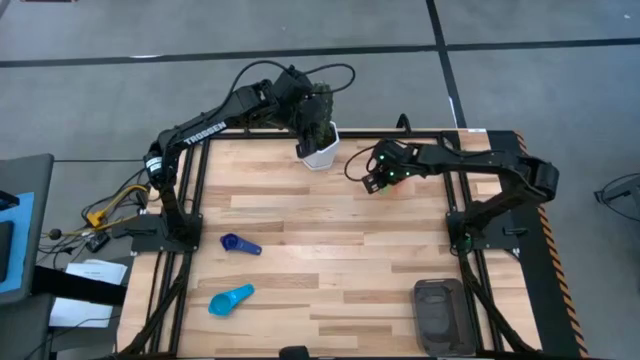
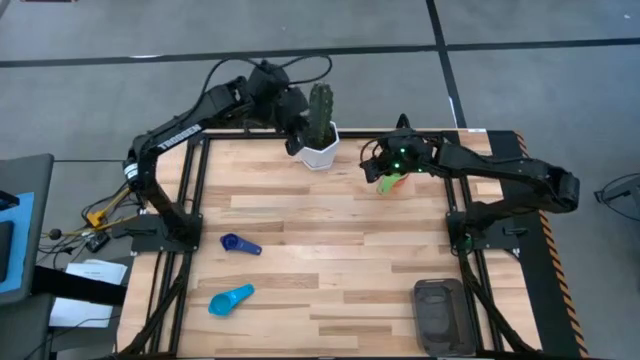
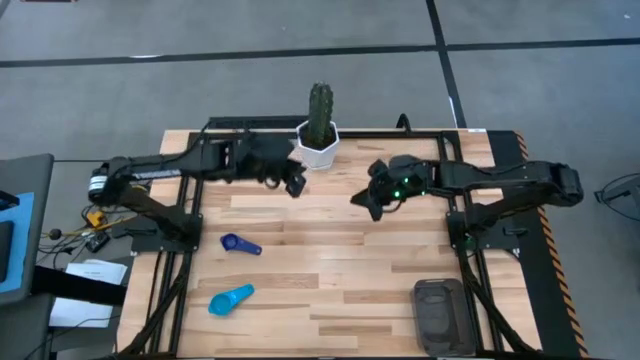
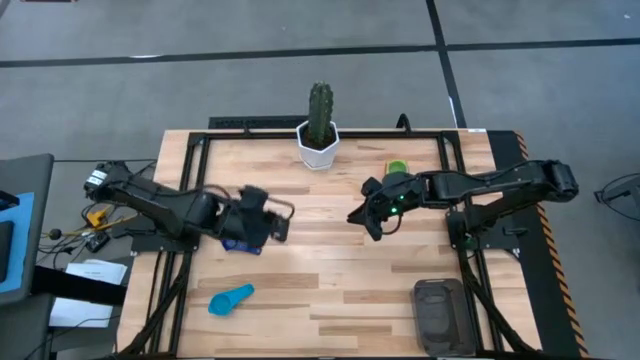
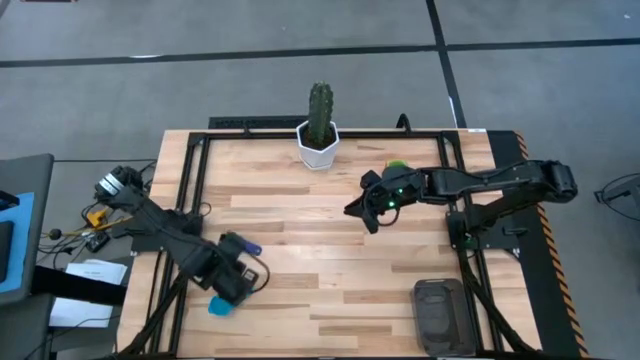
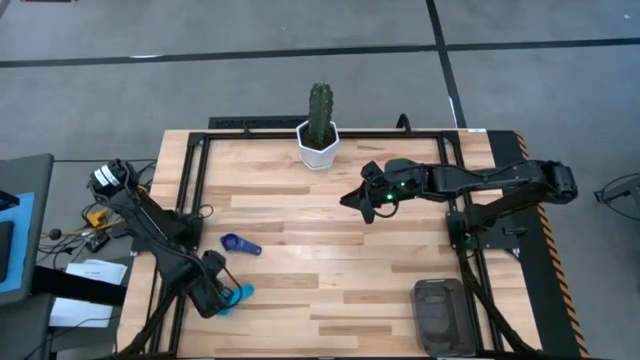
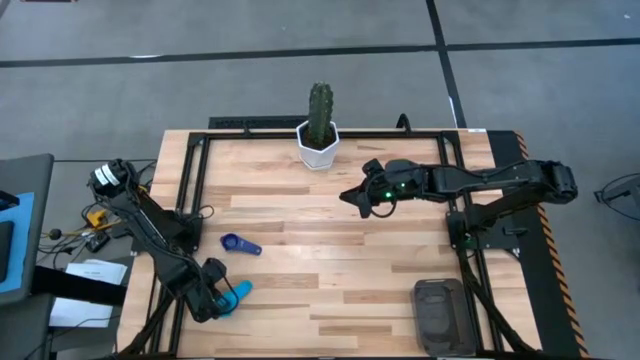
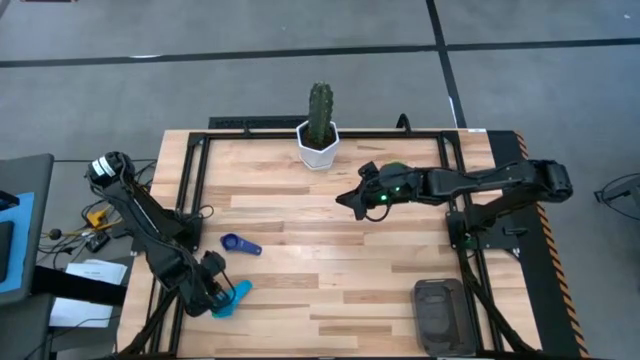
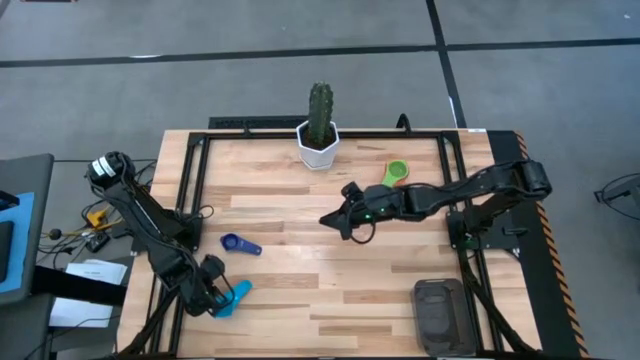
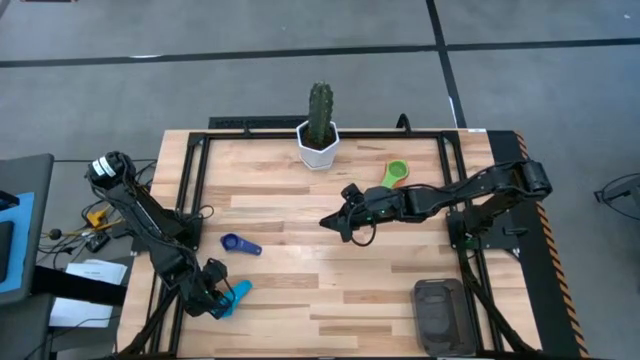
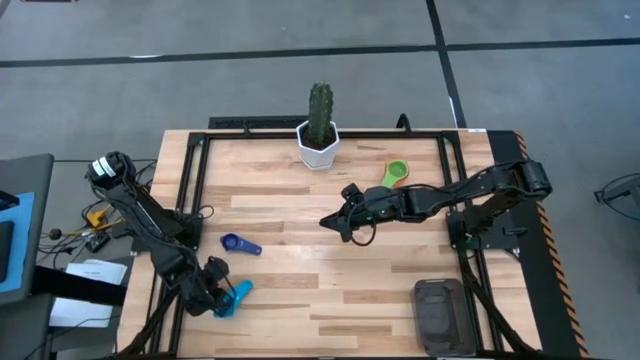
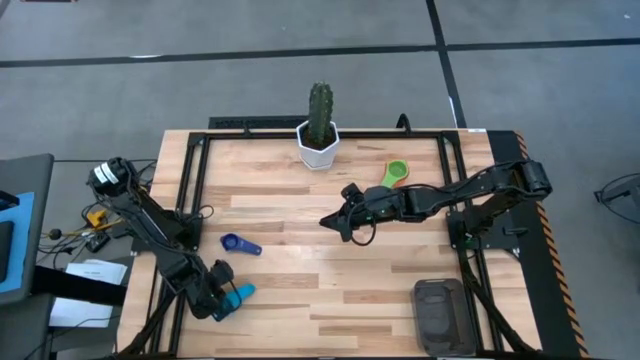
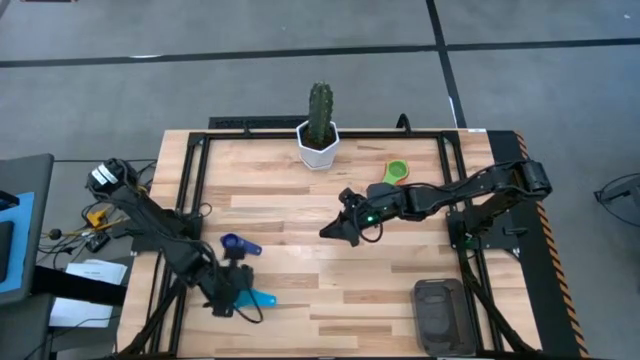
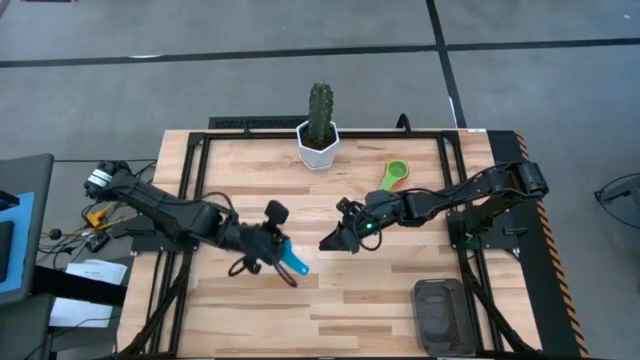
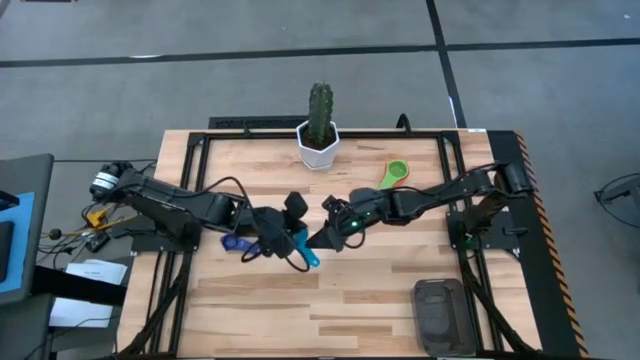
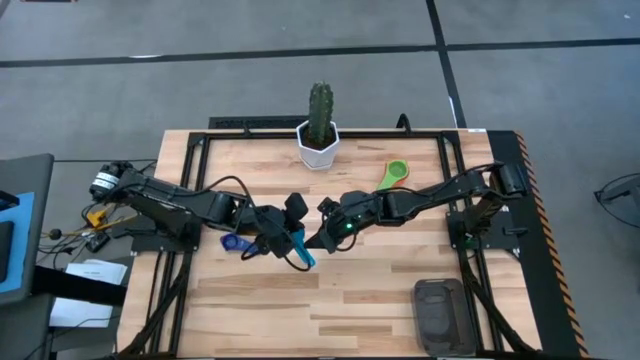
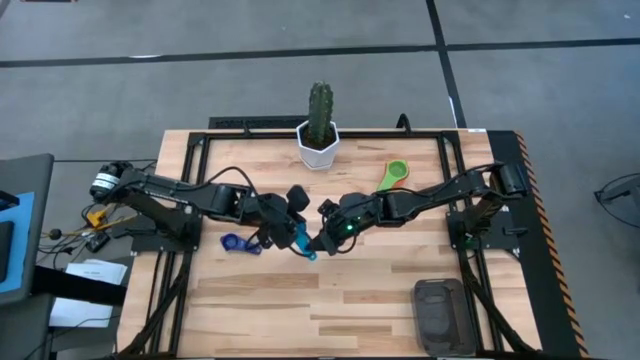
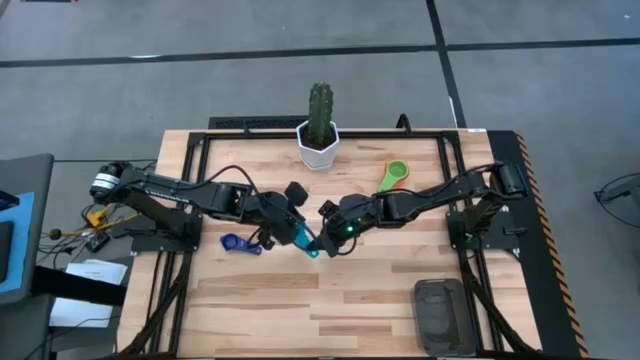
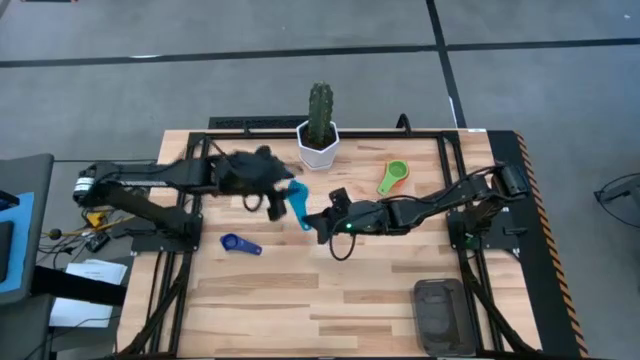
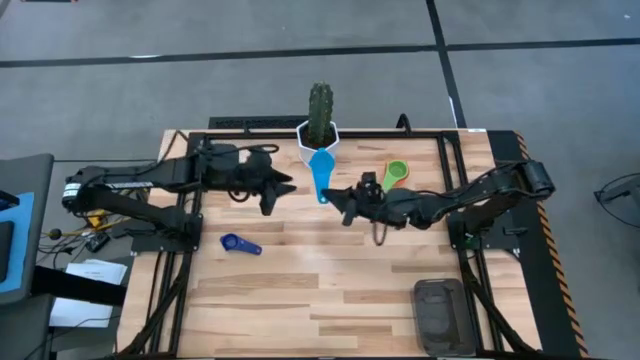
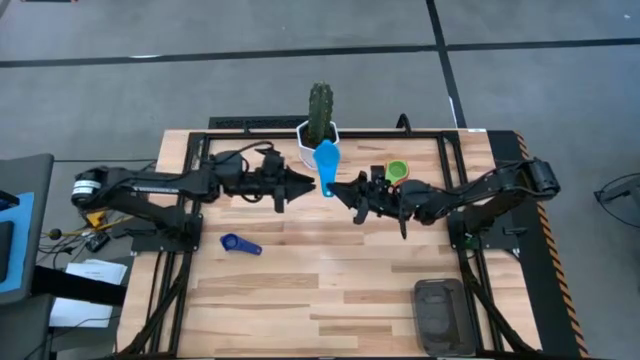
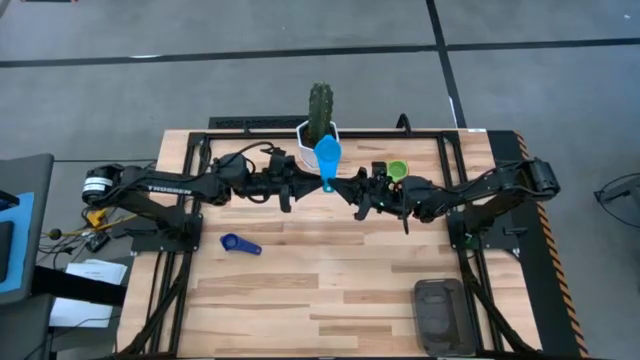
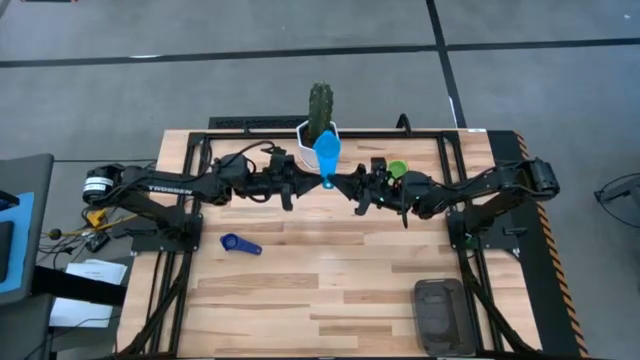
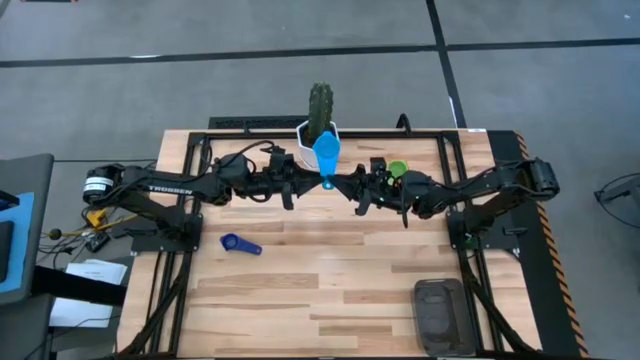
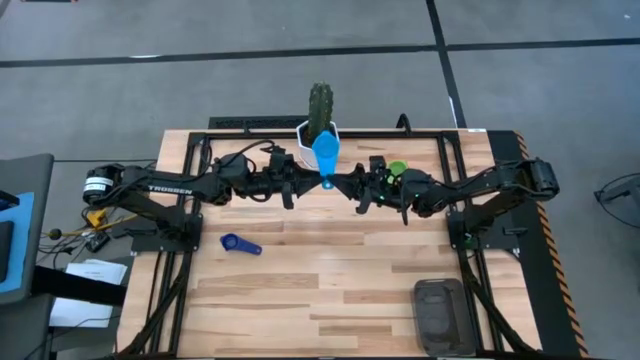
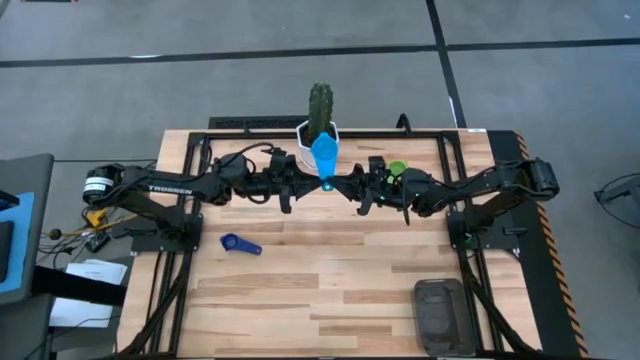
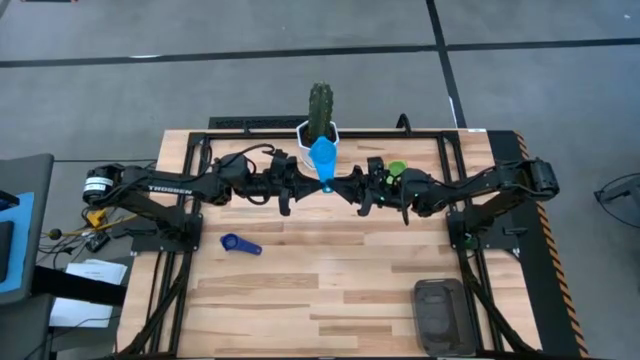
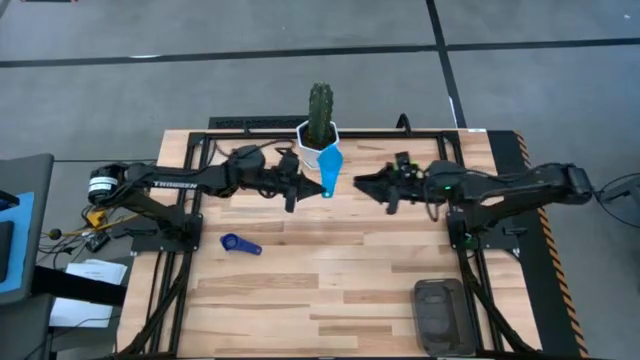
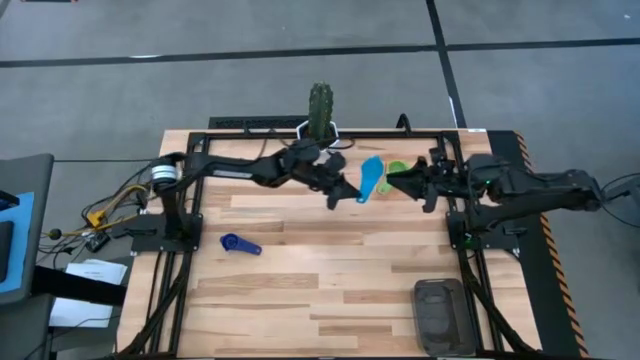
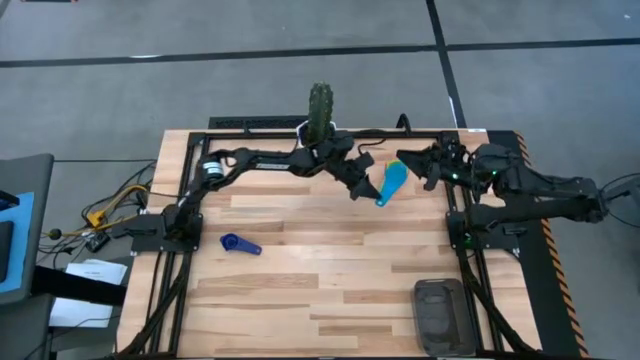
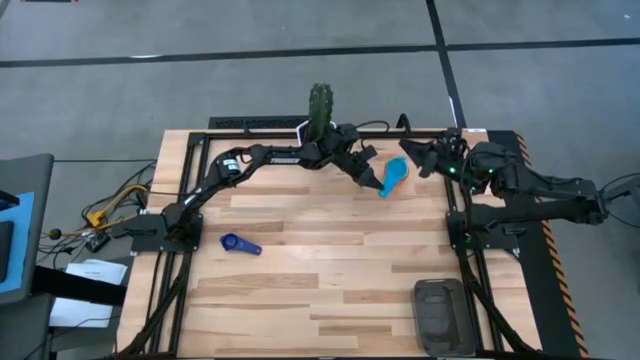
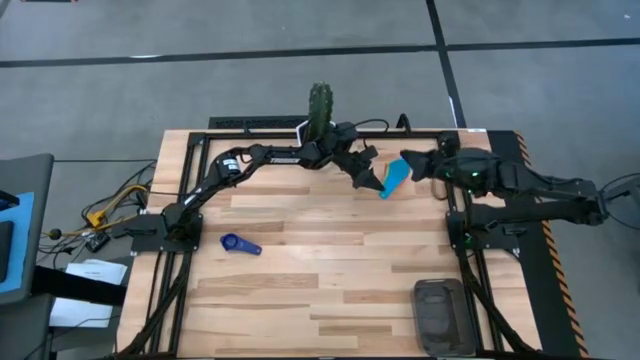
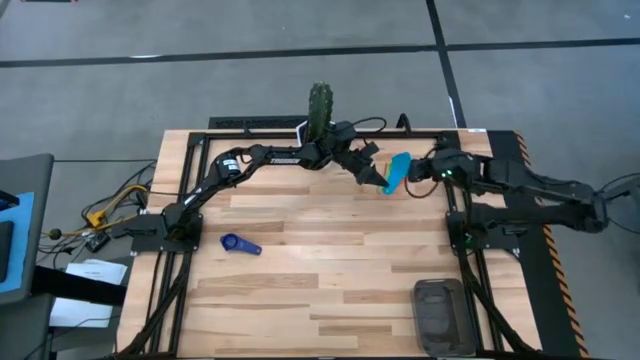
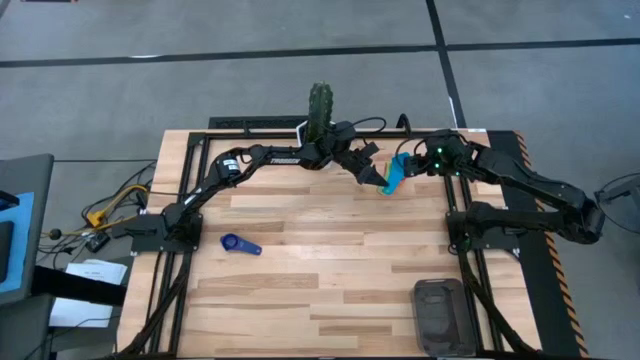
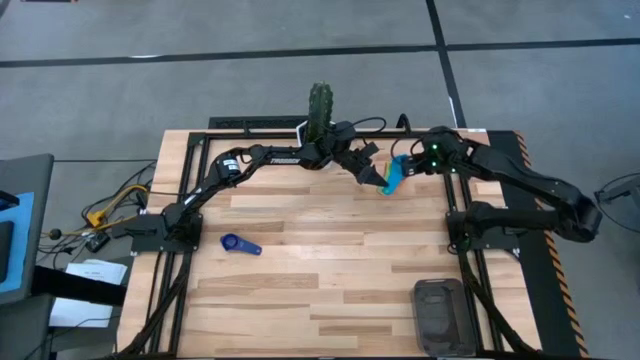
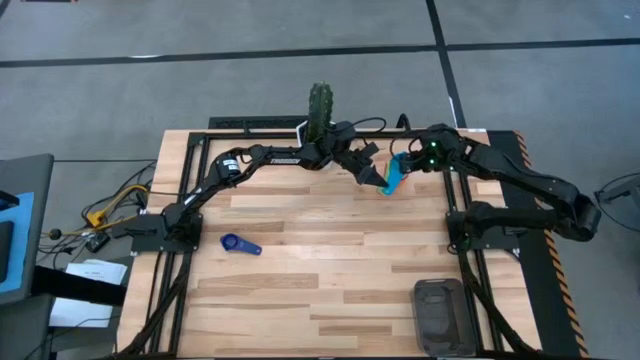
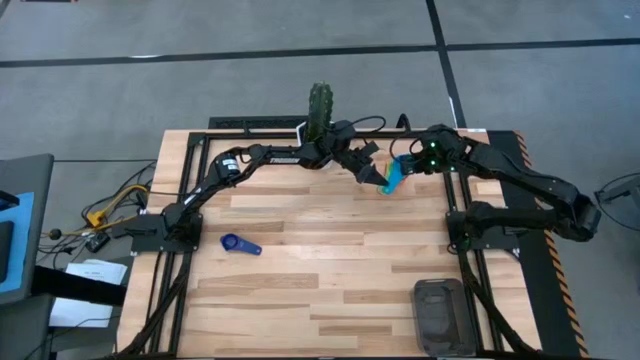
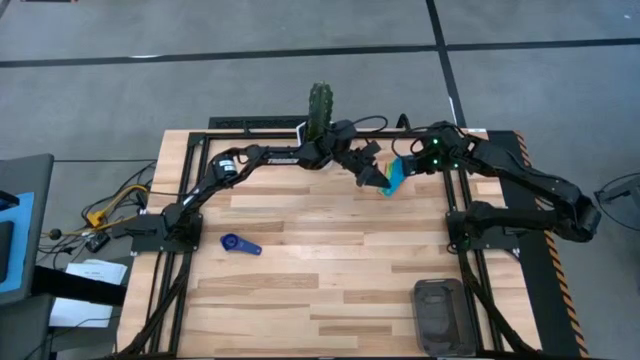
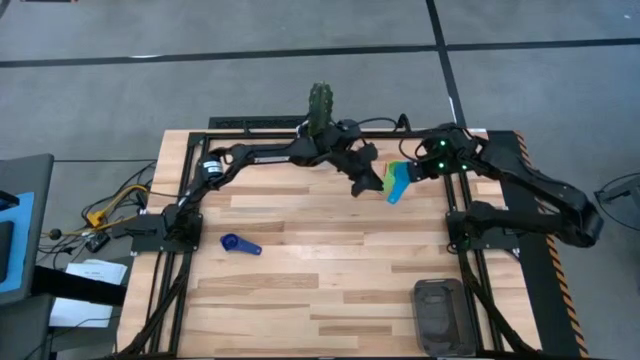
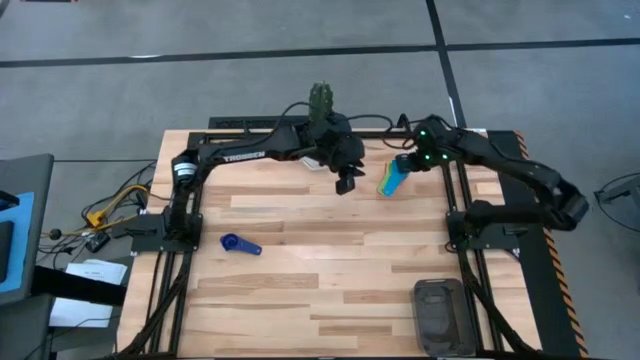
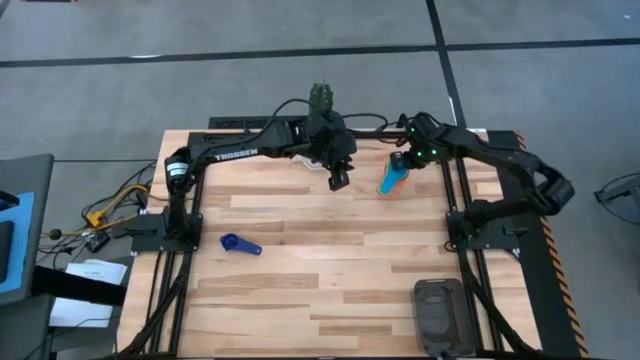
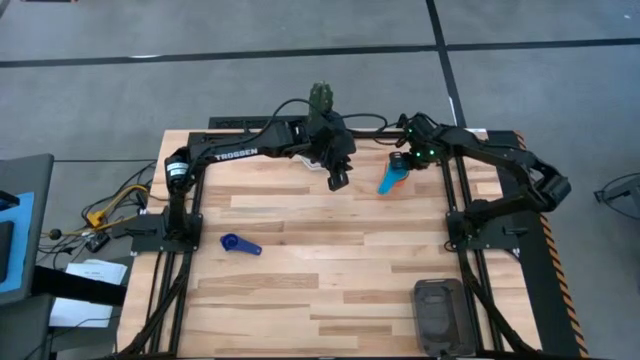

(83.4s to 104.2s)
Task: Nest measuring cups in basket
Stack the light blue measuring cup on top of the green measuring cup
